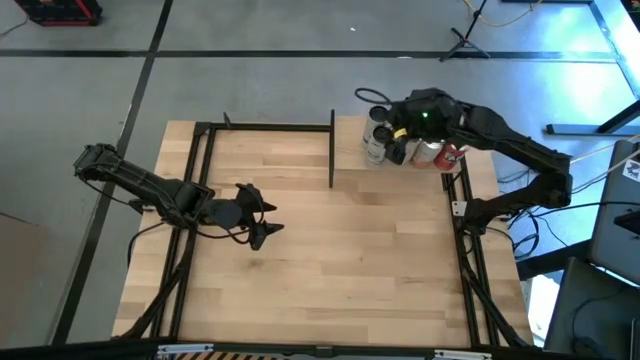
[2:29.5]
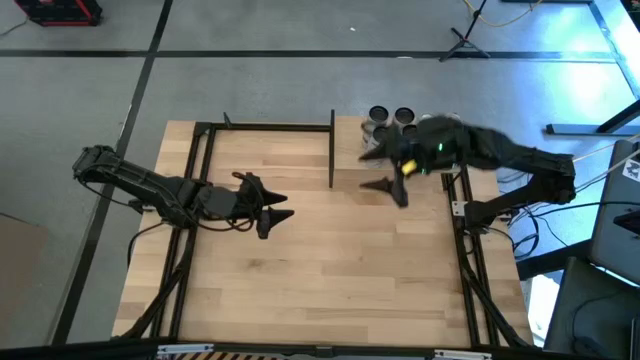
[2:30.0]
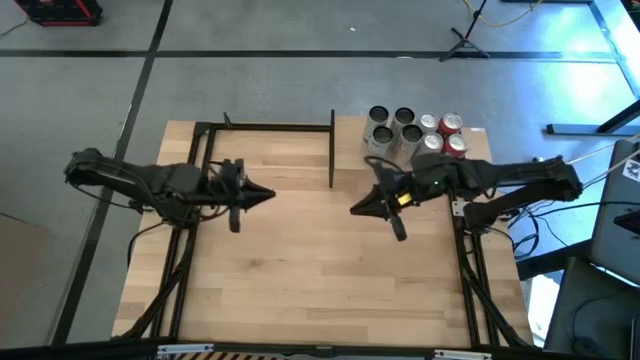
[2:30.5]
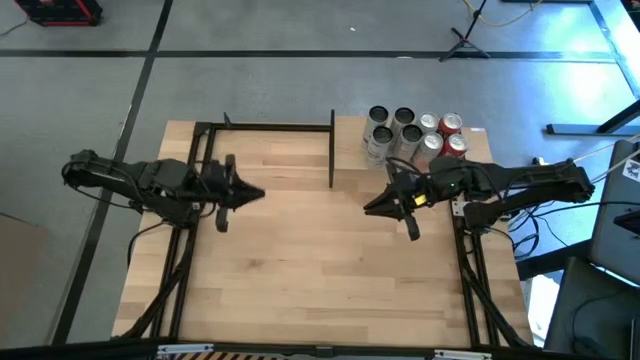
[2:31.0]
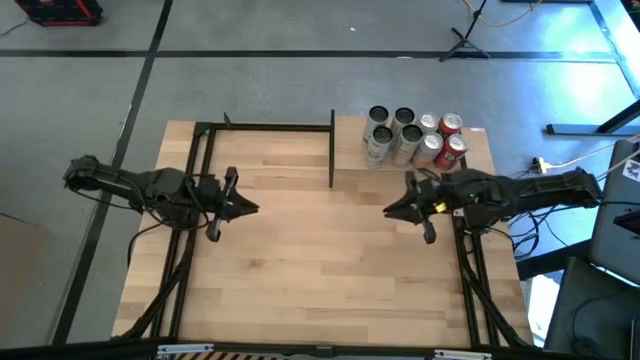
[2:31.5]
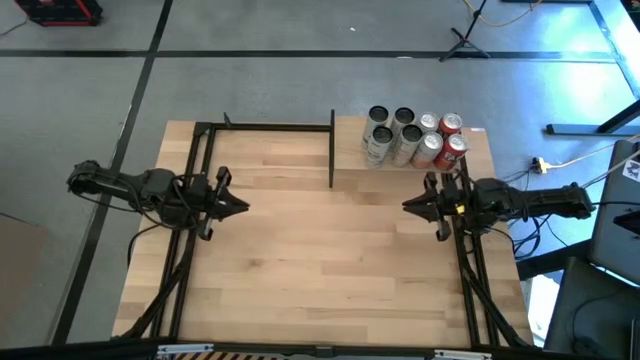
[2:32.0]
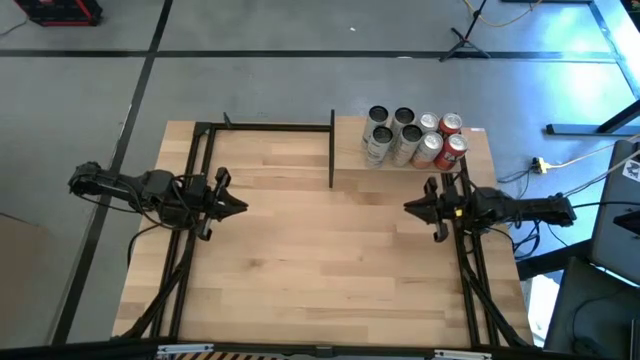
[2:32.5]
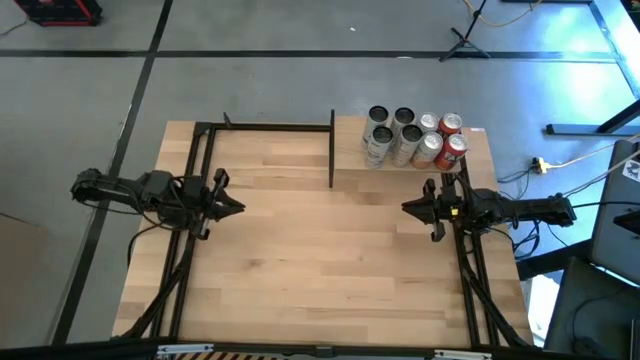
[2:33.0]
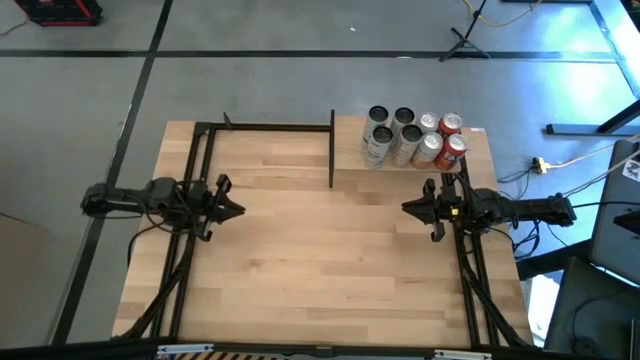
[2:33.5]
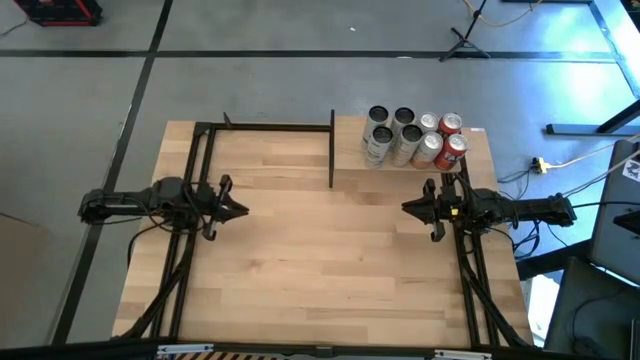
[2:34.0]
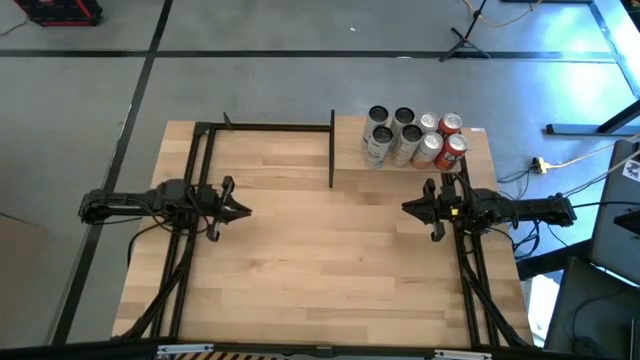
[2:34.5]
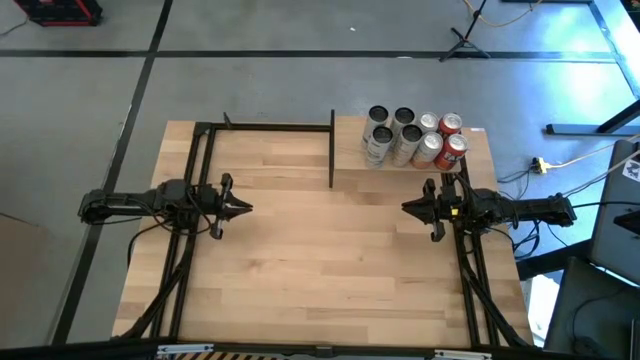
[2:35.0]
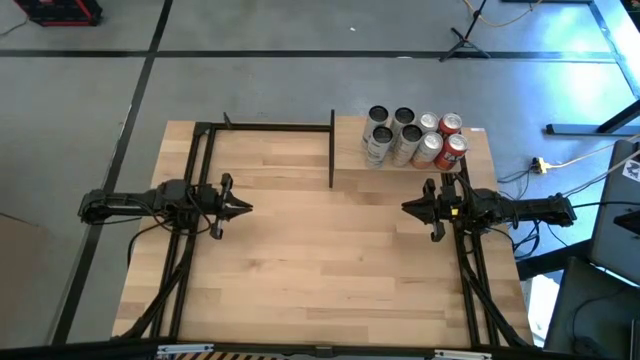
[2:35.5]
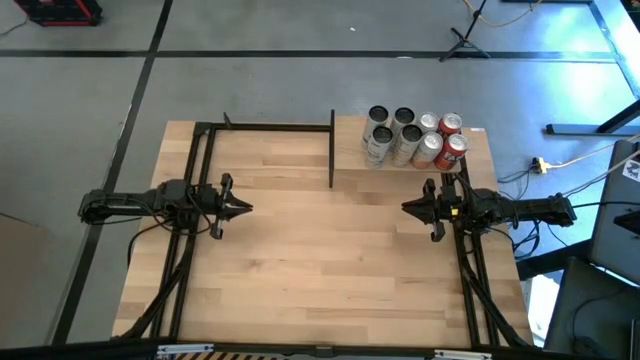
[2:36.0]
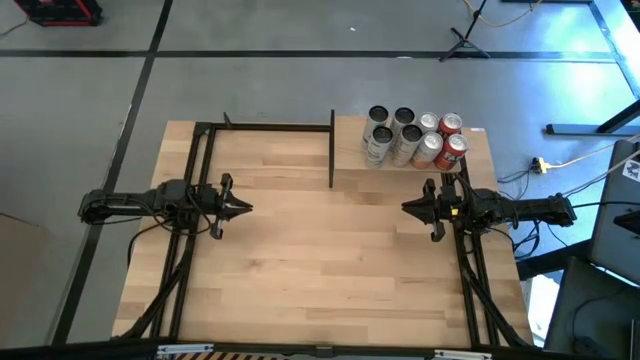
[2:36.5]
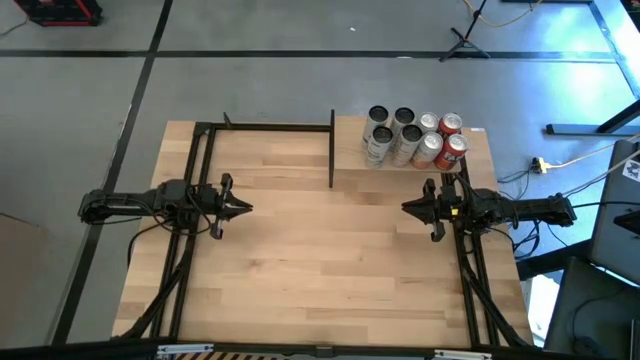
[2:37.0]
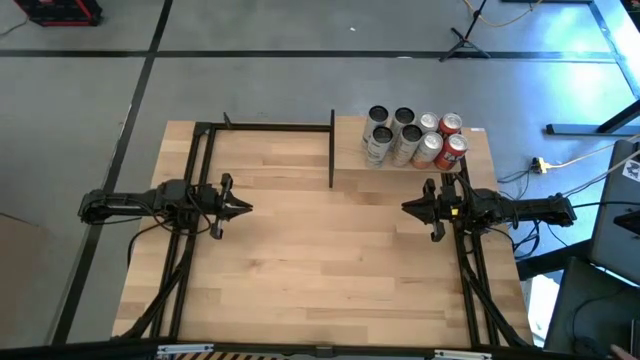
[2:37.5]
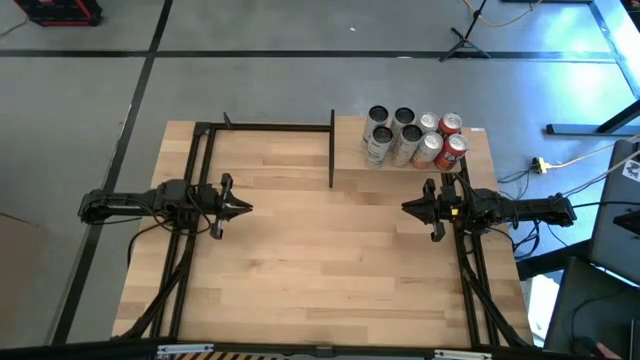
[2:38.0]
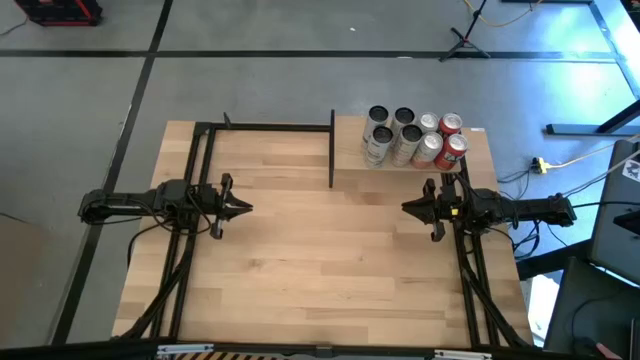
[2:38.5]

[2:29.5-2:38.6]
Task: Place canned beverage on shelf
Return to Home Position

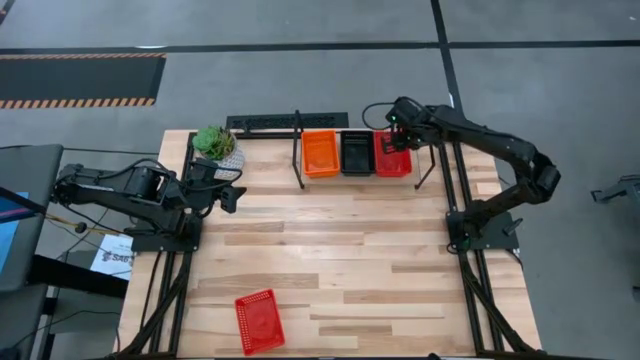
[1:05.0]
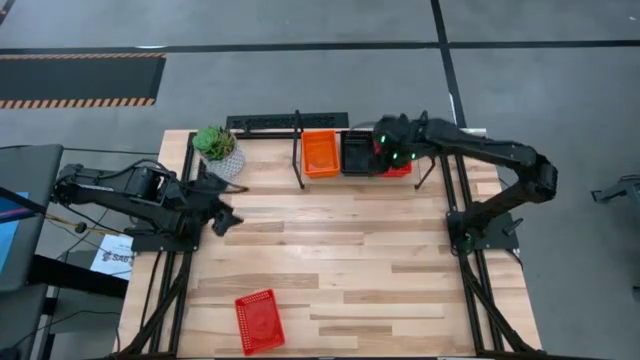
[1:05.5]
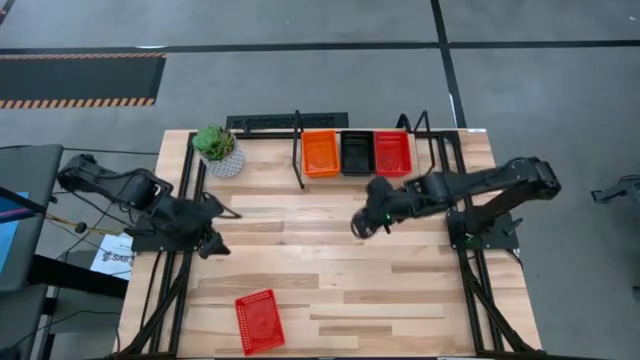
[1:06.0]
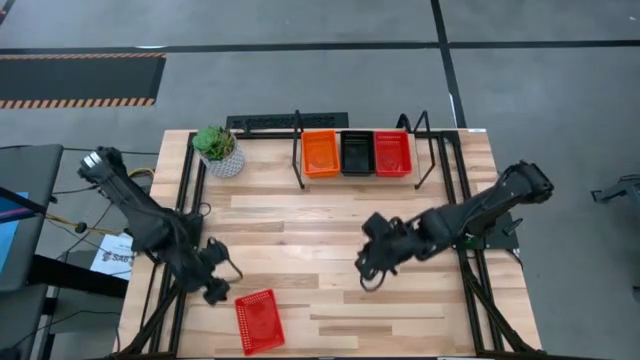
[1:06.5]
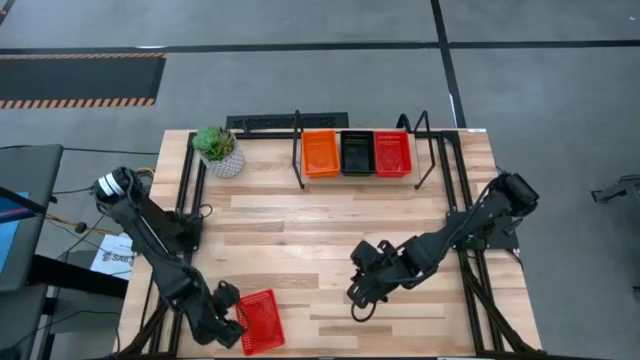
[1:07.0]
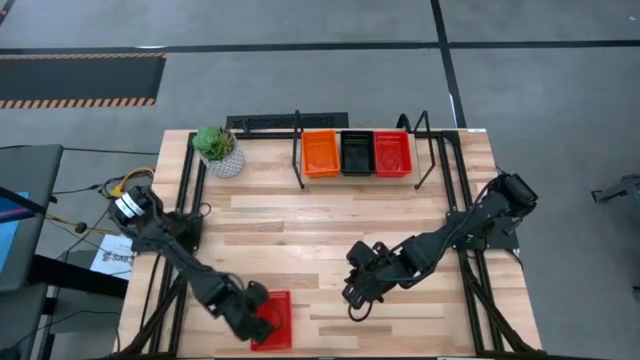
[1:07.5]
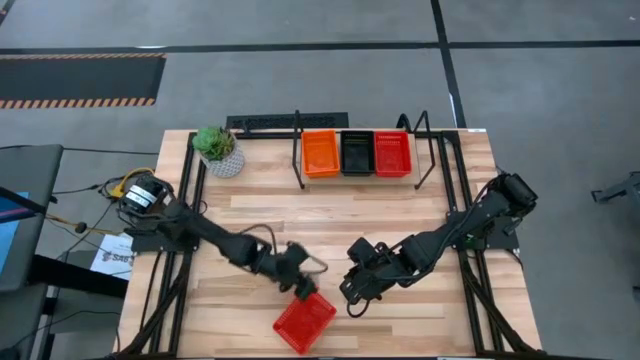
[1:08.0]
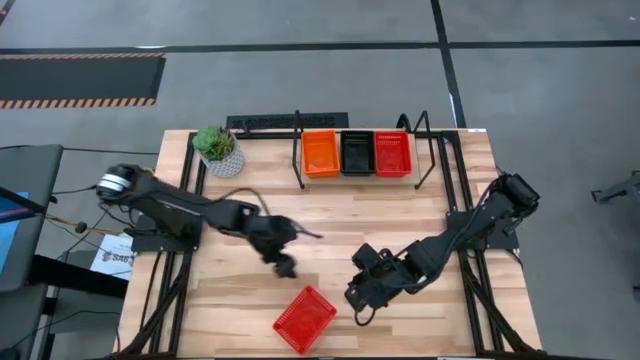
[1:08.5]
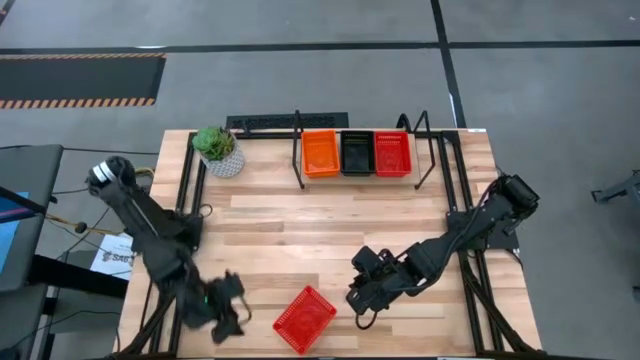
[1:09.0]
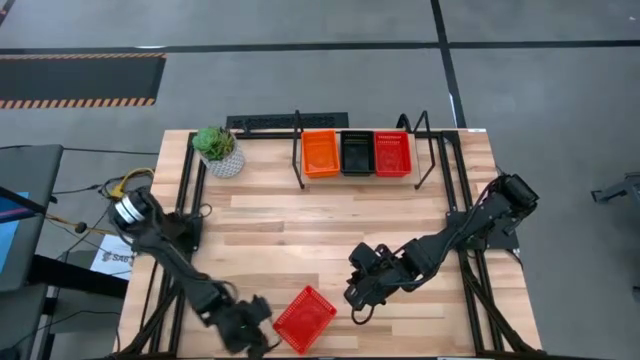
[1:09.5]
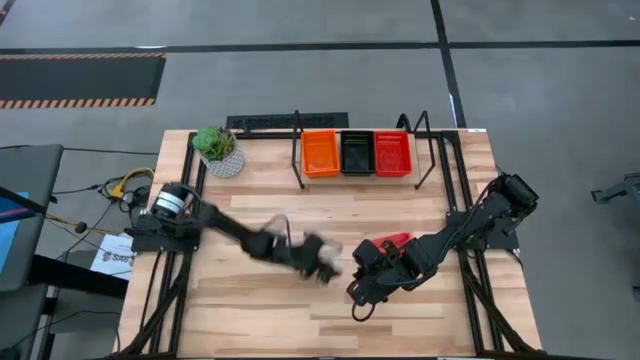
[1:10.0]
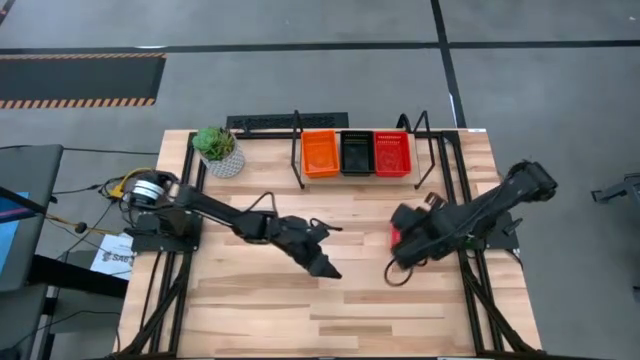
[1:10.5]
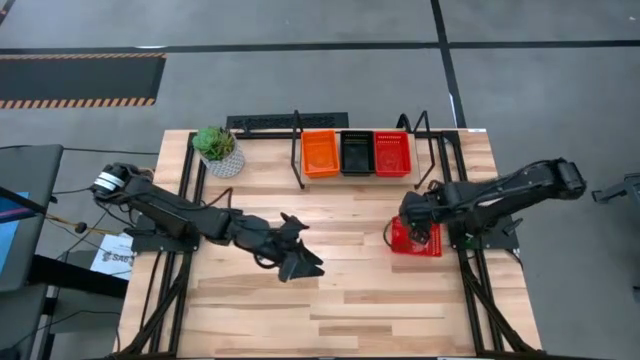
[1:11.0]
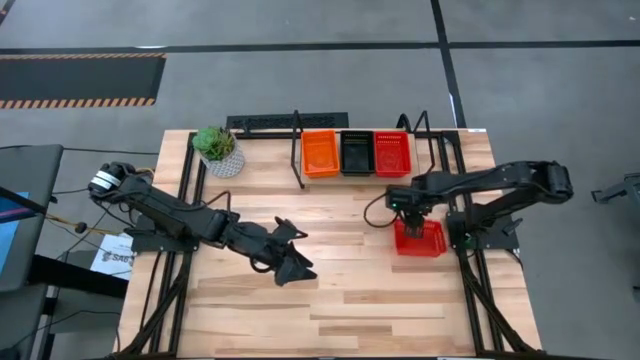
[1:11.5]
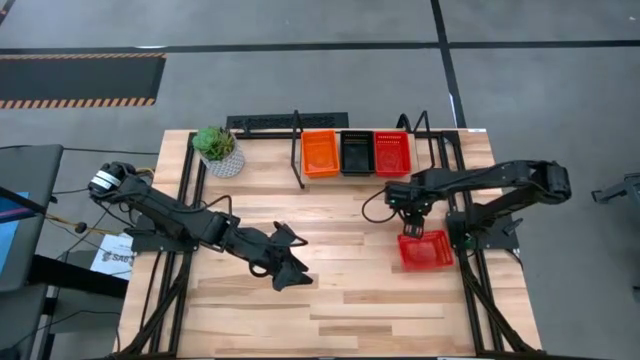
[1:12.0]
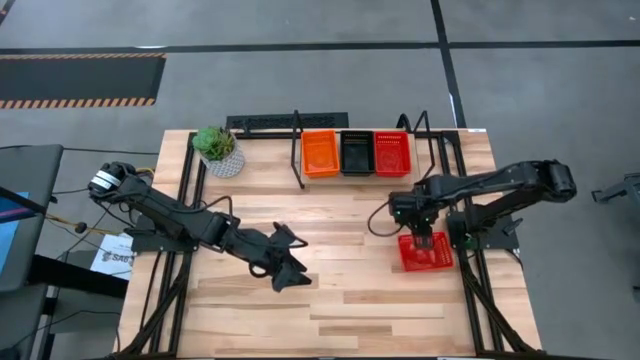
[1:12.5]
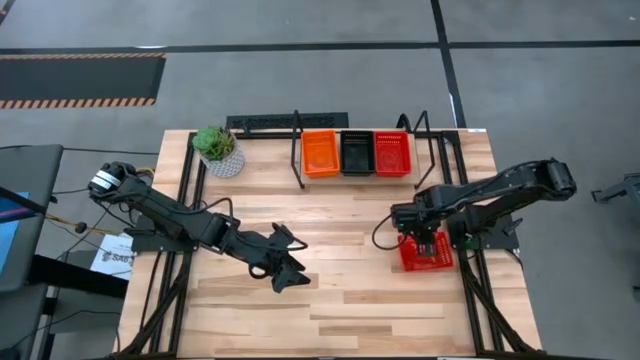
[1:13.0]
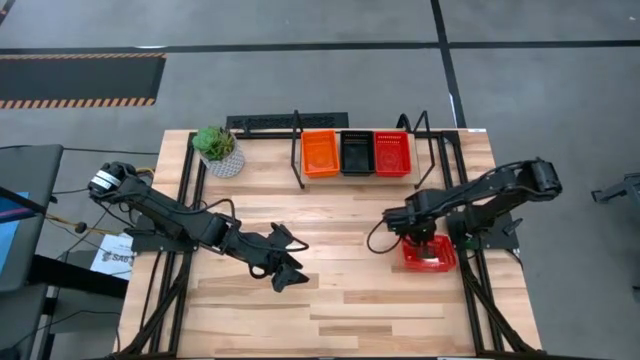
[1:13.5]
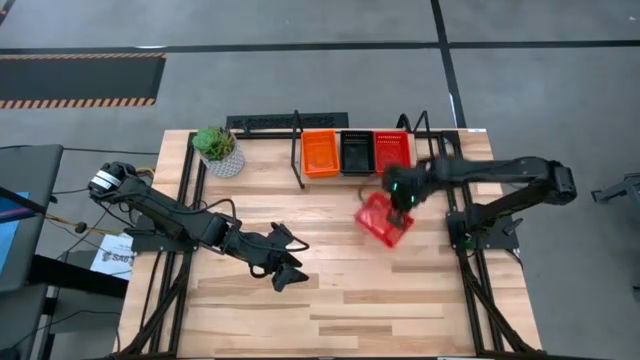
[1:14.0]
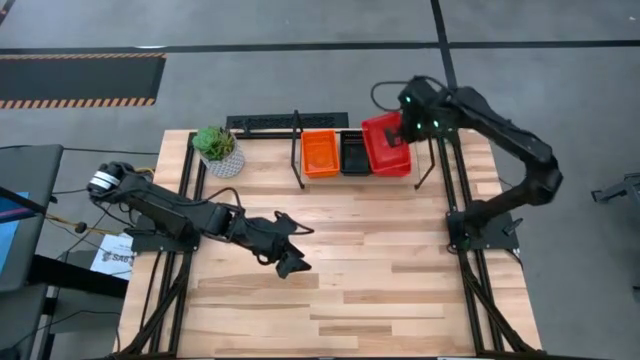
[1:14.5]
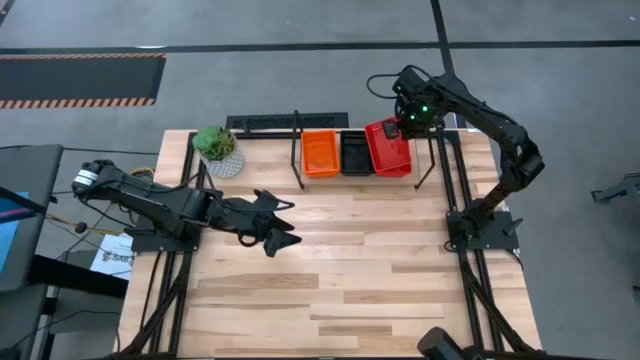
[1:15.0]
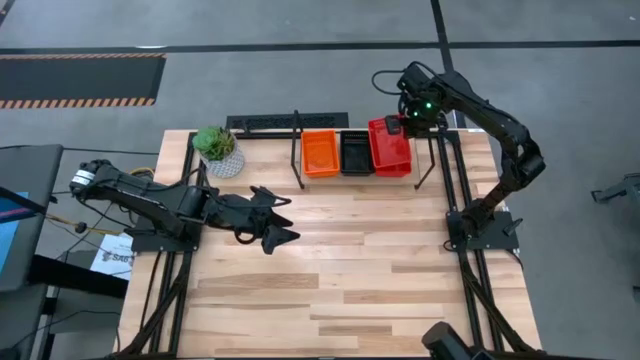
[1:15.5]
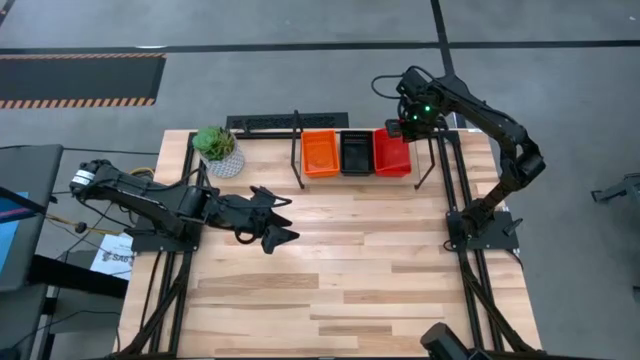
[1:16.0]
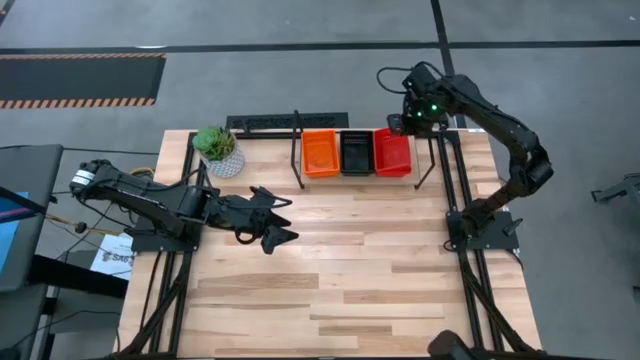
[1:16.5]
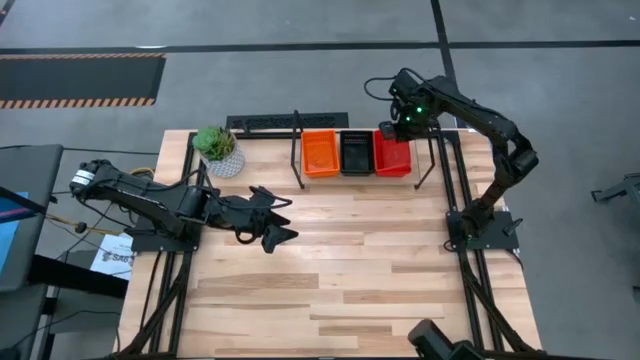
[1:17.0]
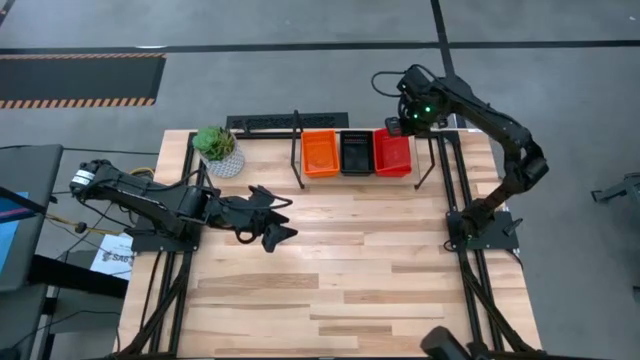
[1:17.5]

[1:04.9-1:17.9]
Task: Stack baskets on shelf by color
Stack the red bin on top of the red stacked bins on the shelf
